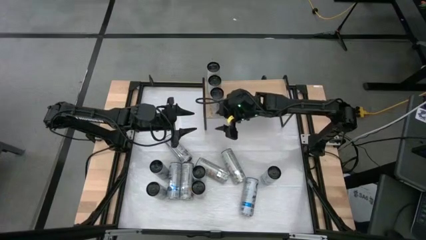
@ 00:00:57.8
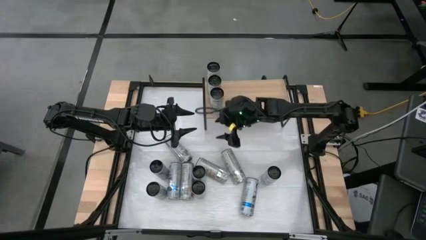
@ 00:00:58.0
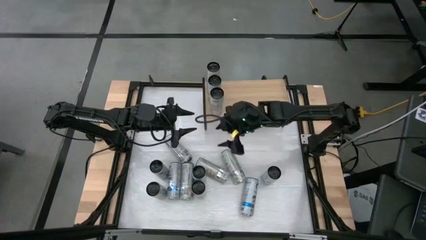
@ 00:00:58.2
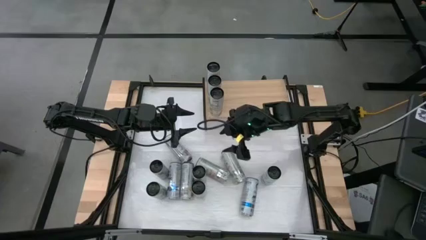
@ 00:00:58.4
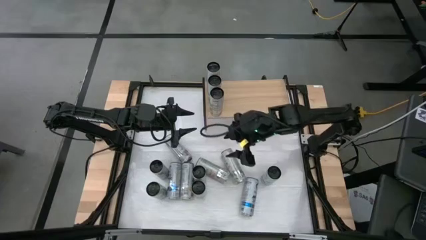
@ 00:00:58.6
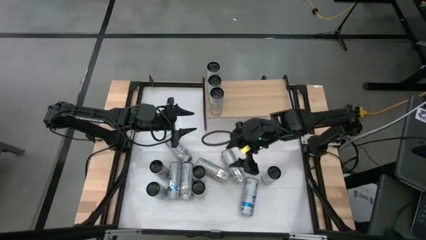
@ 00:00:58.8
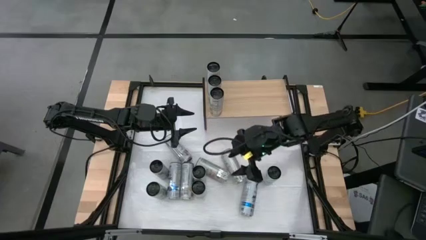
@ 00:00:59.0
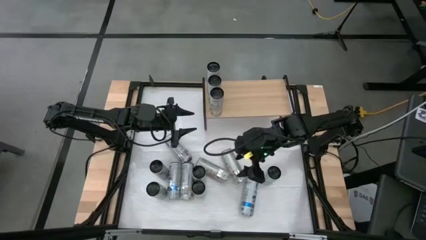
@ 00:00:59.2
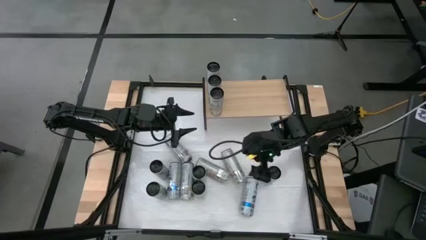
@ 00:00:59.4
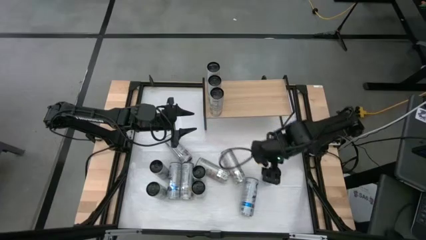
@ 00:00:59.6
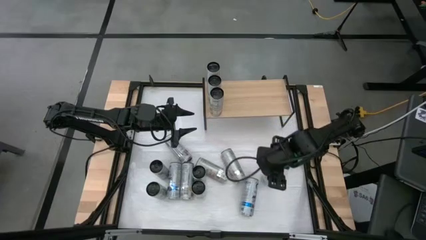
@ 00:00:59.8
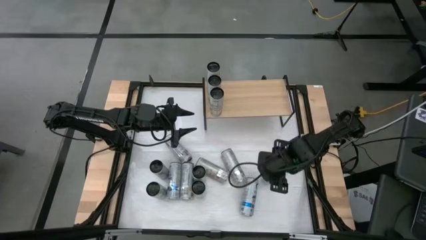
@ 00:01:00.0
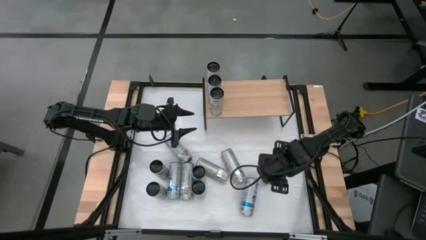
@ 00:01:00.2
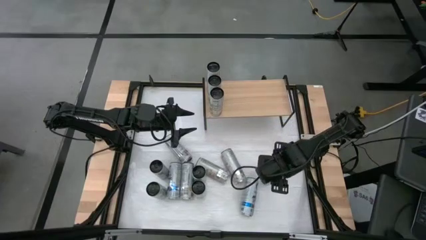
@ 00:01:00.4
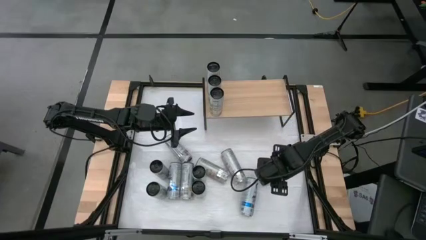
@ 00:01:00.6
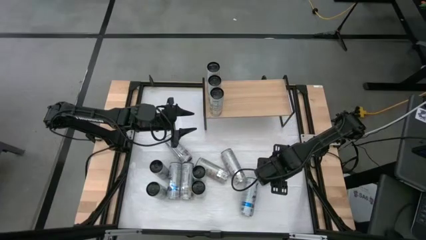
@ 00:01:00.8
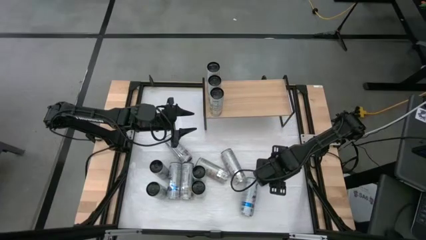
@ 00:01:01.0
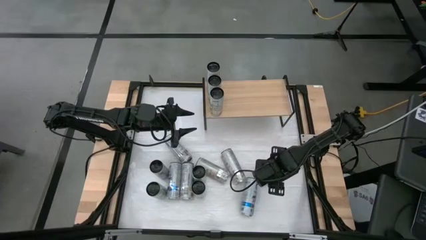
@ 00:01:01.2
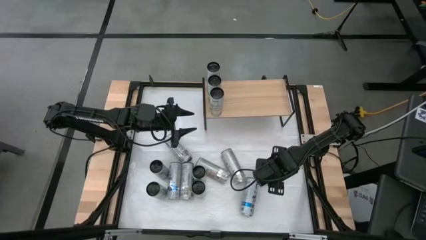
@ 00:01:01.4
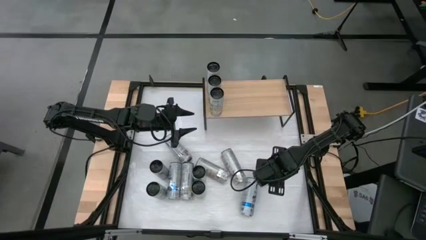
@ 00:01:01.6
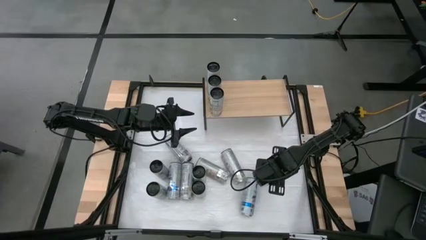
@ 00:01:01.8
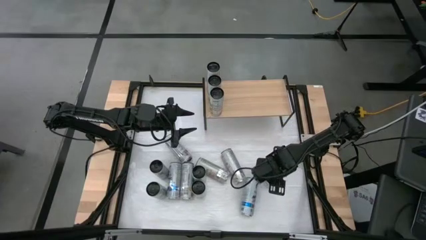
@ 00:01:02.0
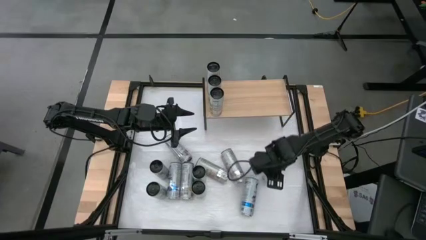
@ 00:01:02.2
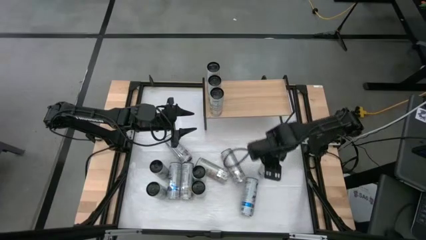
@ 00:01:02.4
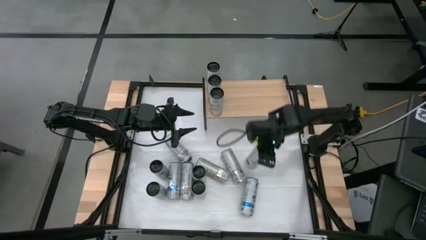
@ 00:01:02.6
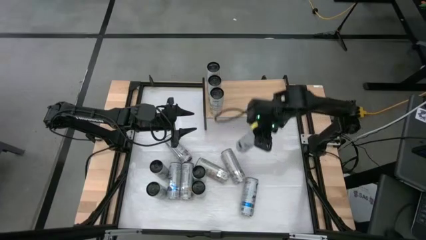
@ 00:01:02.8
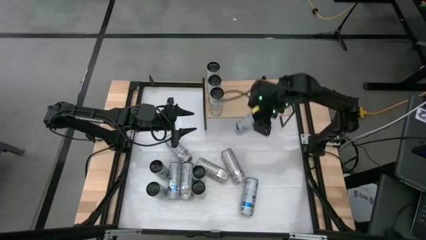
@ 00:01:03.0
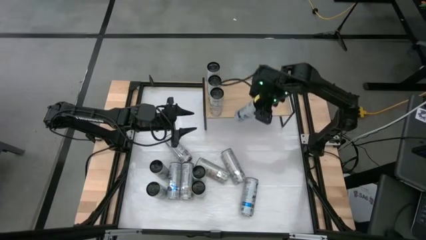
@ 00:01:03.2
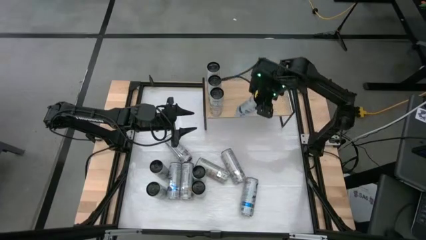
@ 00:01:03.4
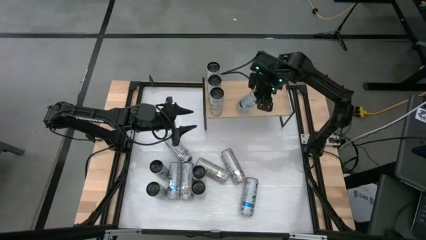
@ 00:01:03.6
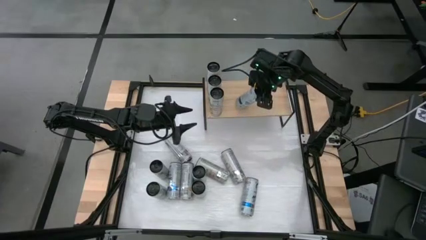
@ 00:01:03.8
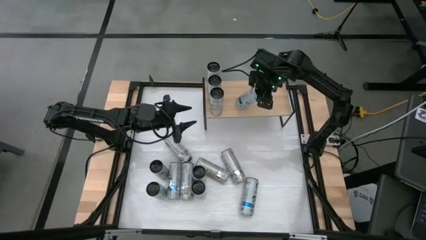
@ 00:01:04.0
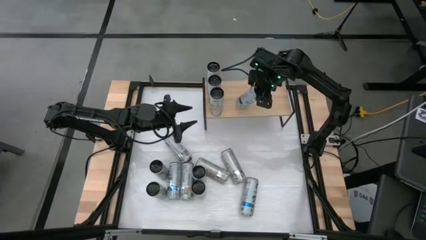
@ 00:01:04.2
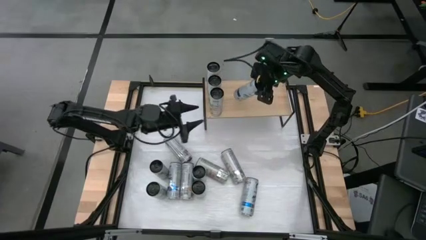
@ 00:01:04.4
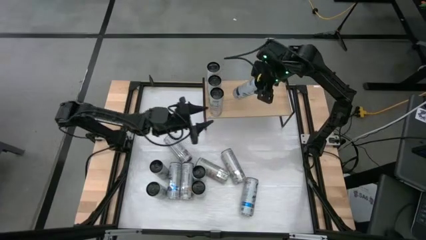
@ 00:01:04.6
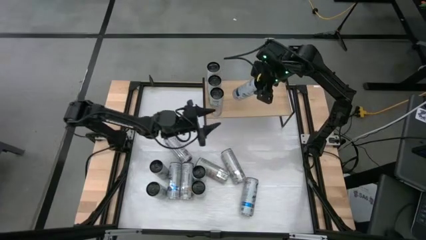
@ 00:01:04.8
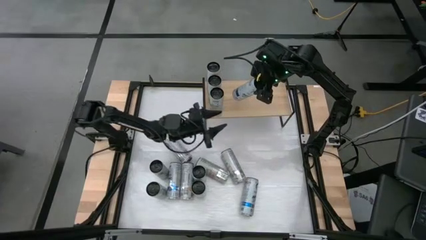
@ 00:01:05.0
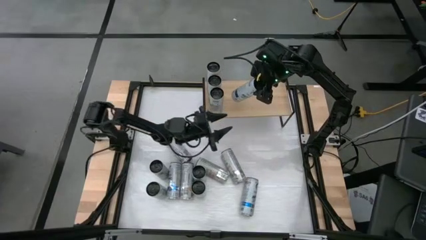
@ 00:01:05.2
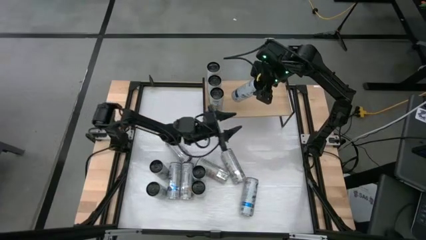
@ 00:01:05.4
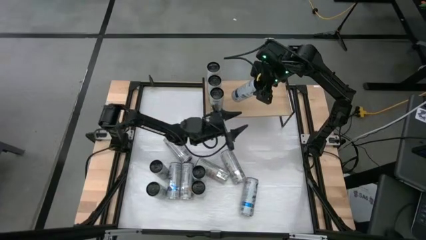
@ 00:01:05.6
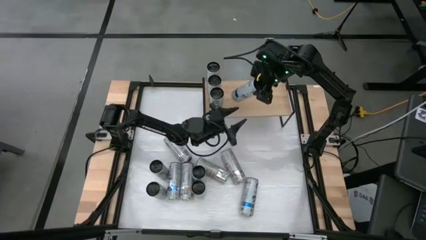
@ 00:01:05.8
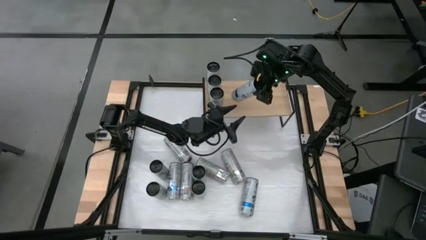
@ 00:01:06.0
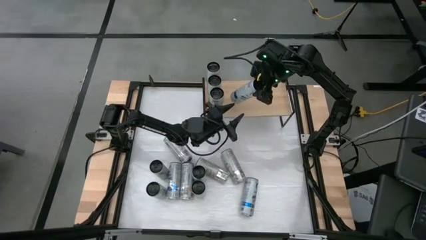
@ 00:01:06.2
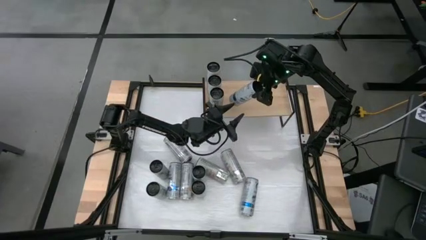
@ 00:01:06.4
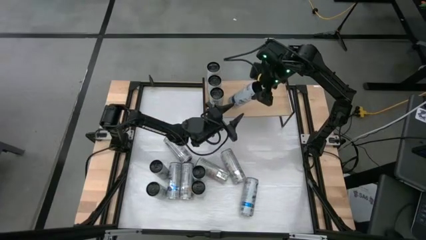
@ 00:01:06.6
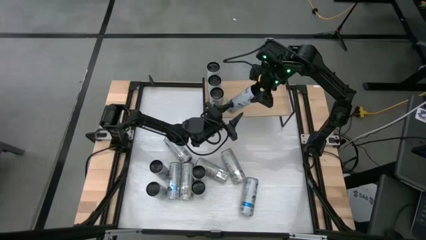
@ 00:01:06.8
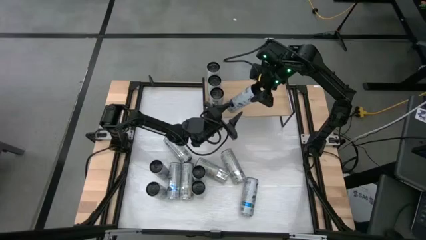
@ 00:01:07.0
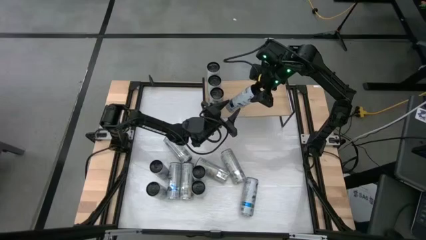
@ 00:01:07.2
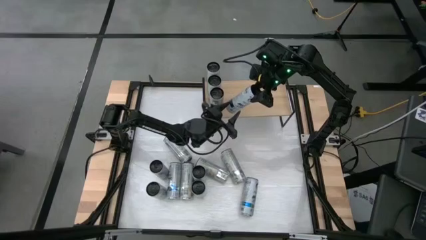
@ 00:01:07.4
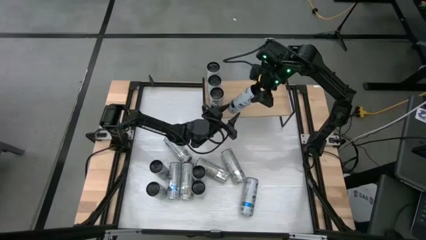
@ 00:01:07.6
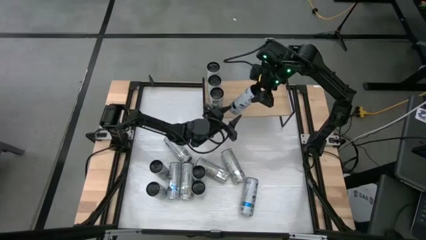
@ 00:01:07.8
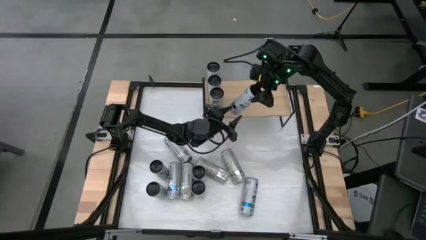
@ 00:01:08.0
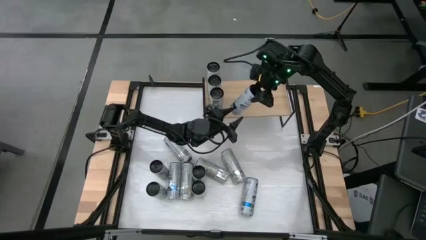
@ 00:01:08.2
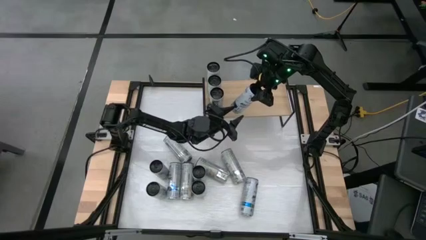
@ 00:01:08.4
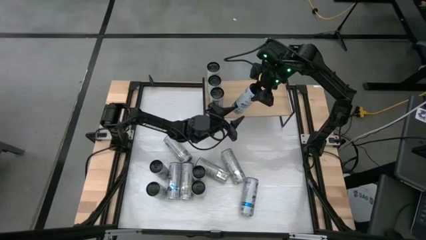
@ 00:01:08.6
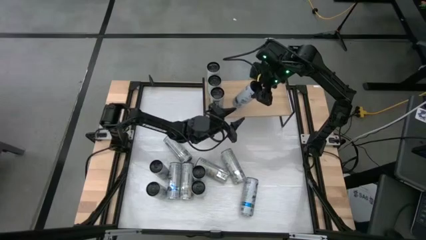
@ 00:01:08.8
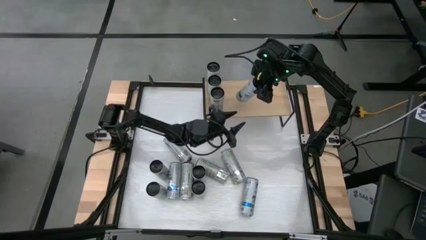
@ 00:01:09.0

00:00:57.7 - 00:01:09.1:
Task: Place canned beverage on shelf
Put the blue soda can on the shelf

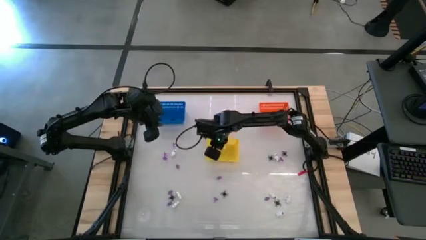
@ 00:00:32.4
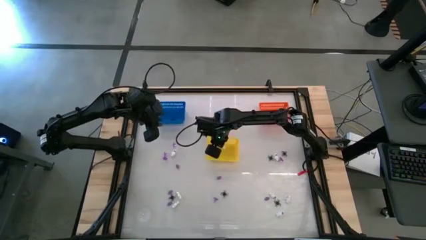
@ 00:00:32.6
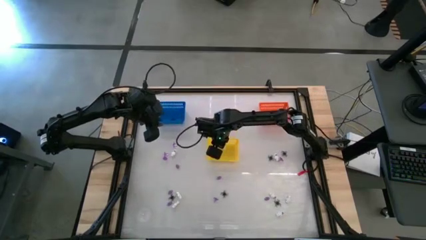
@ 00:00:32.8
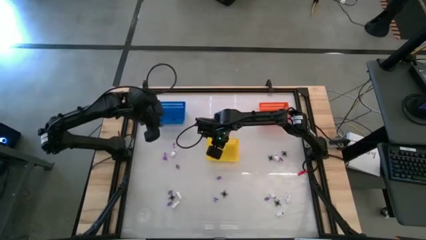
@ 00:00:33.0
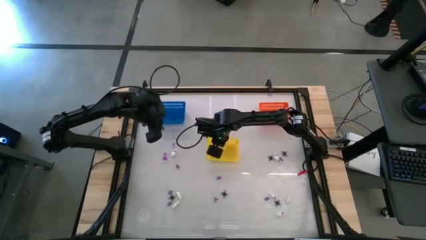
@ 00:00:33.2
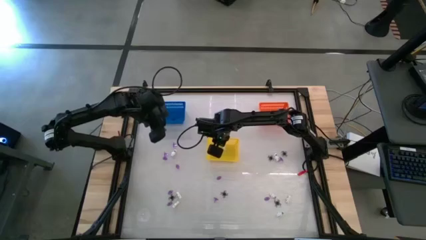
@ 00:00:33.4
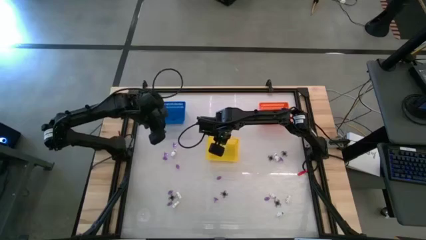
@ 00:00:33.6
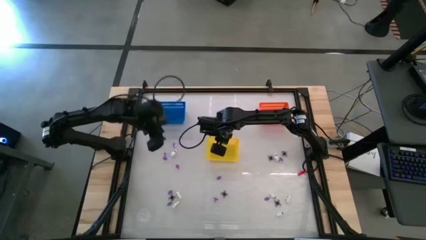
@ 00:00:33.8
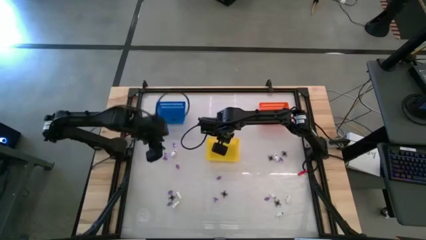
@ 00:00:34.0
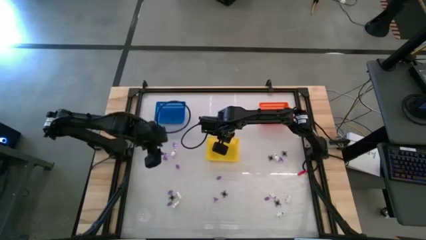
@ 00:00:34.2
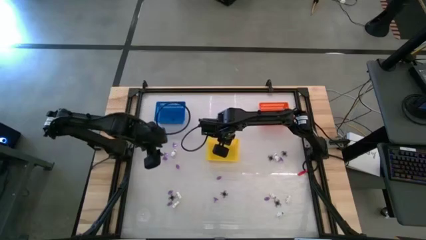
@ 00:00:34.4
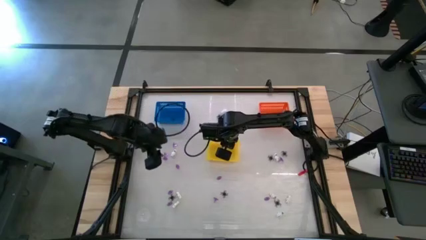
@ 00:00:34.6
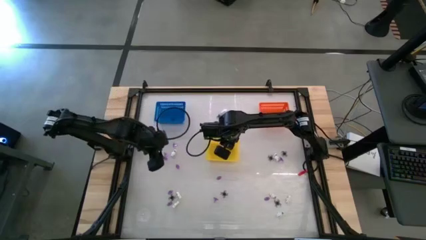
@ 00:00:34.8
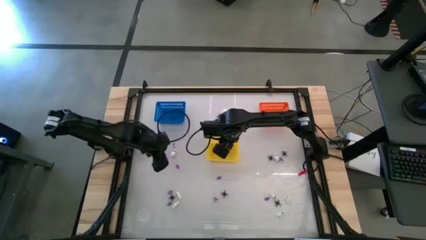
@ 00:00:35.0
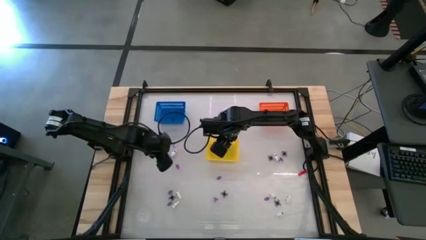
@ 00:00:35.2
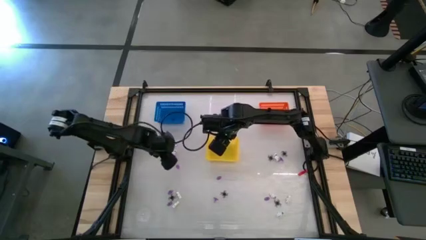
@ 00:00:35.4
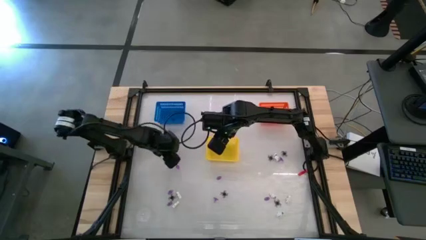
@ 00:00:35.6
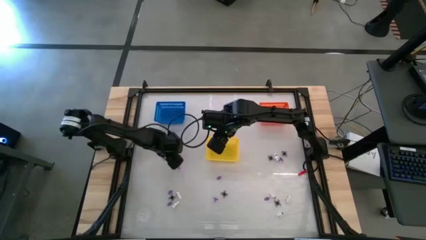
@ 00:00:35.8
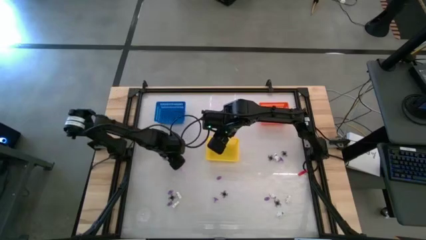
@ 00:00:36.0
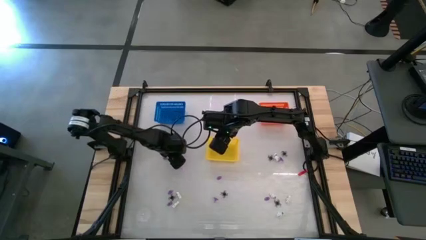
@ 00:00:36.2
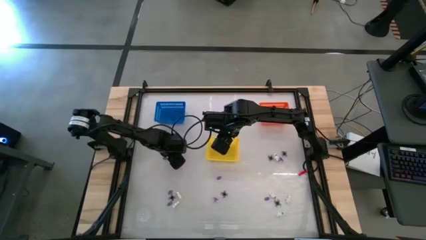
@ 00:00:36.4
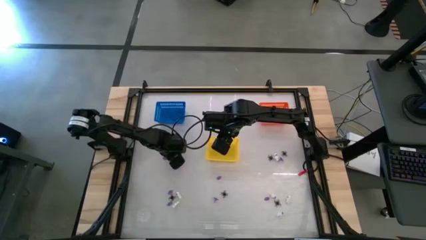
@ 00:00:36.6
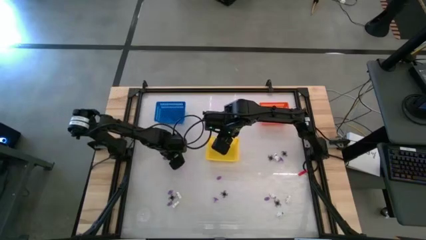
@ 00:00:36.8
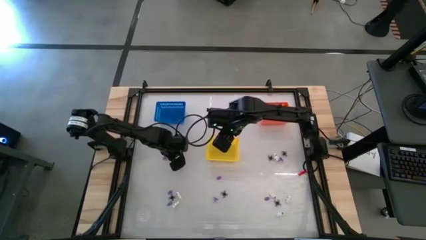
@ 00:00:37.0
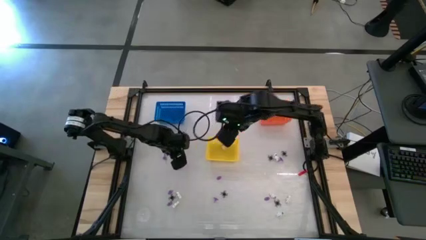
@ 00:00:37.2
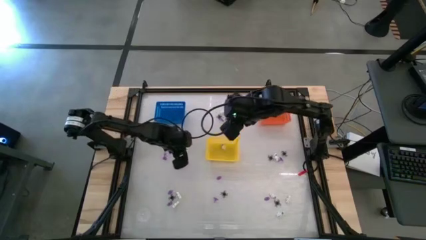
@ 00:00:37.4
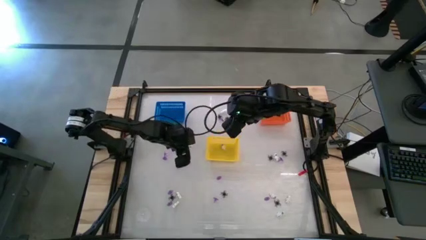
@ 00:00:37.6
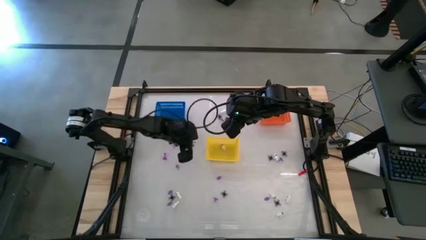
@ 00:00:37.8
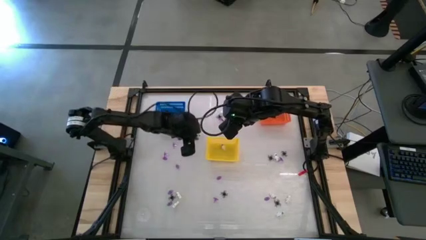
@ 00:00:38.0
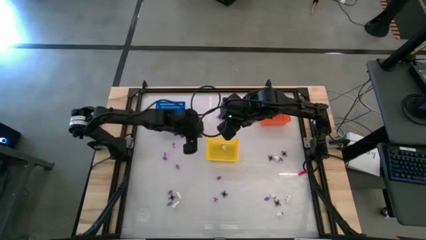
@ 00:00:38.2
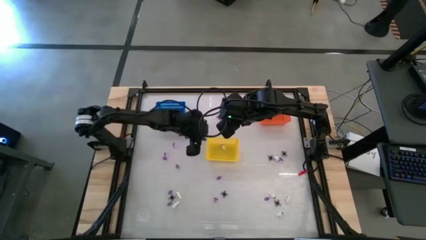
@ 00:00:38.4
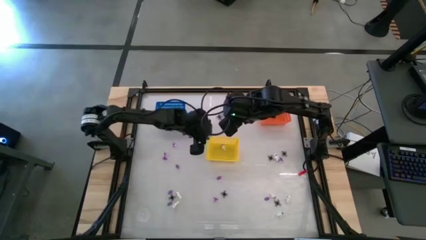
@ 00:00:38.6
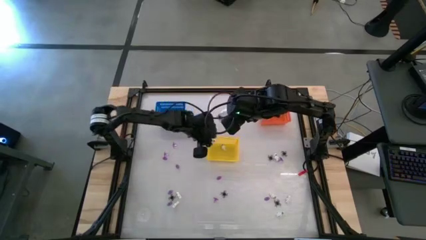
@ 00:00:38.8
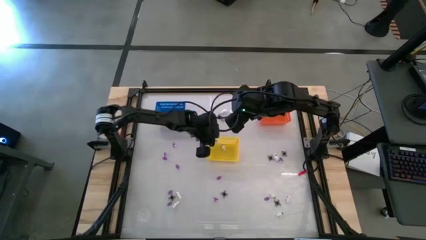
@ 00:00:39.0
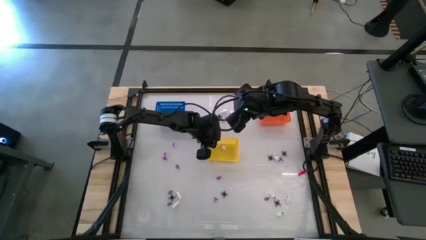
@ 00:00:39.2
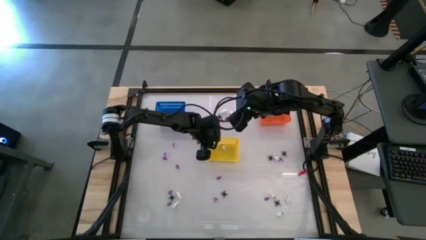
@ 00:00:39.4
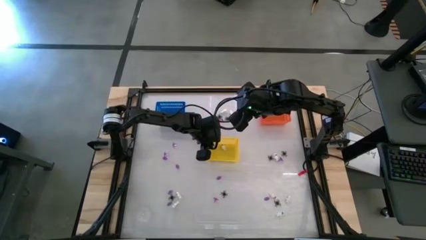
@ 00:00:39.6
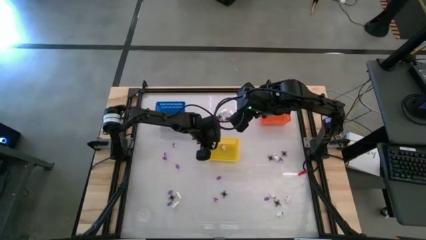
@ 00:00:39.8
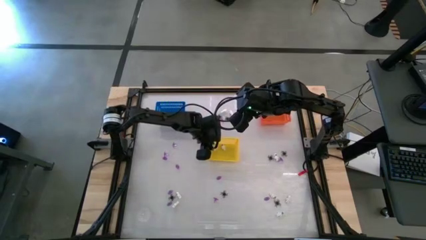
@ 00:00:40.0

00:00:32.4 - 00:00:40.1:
Task: Sort Halloween decoration
Put the white skeleton toy into the yellow bin
